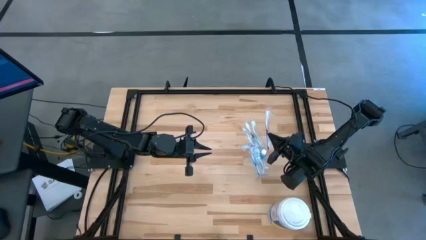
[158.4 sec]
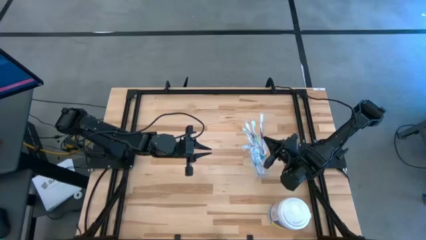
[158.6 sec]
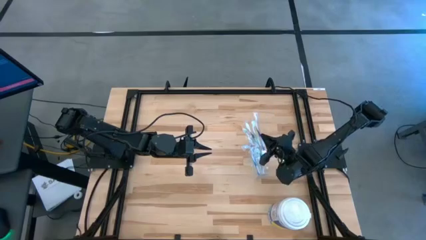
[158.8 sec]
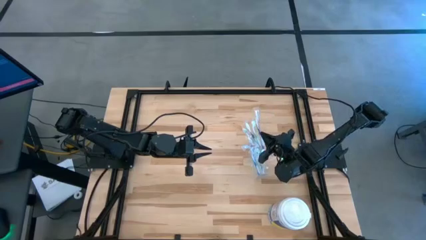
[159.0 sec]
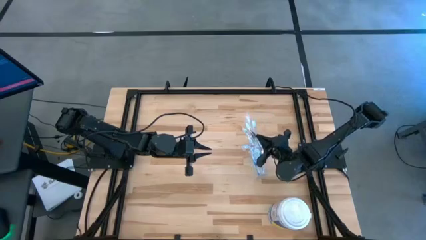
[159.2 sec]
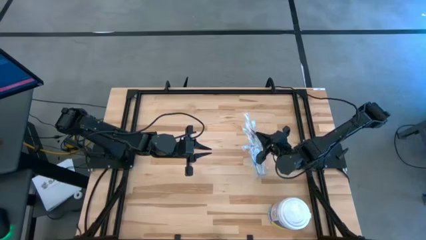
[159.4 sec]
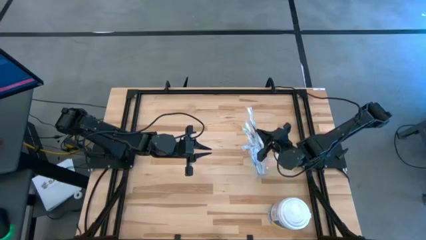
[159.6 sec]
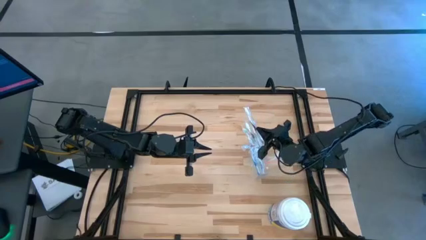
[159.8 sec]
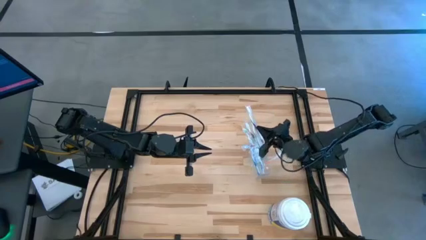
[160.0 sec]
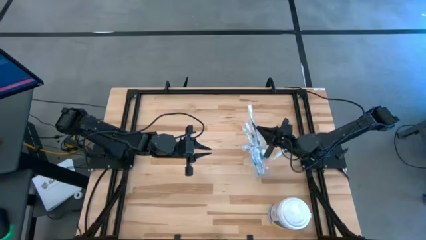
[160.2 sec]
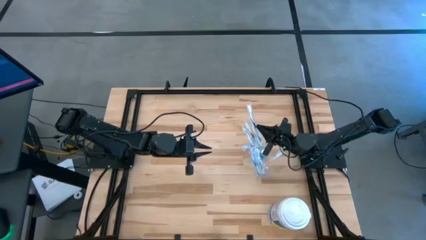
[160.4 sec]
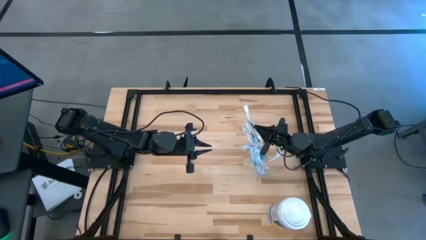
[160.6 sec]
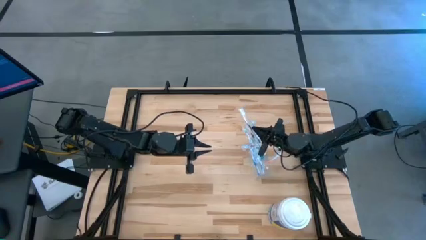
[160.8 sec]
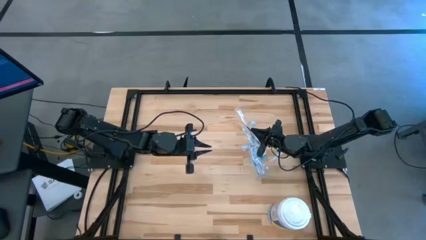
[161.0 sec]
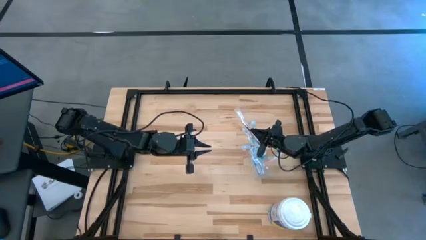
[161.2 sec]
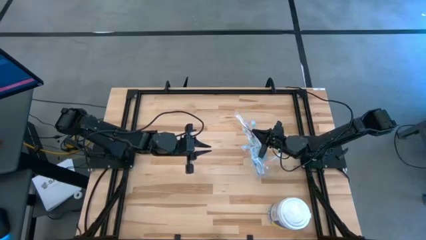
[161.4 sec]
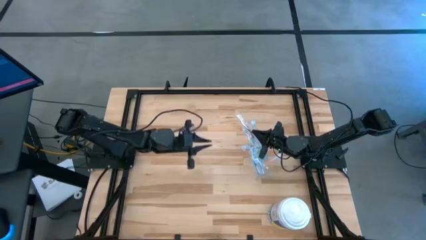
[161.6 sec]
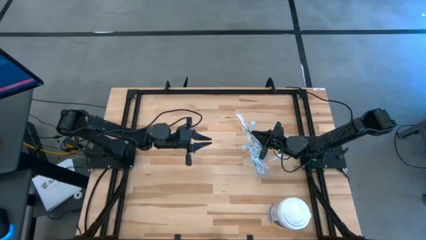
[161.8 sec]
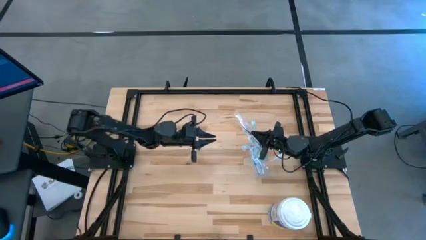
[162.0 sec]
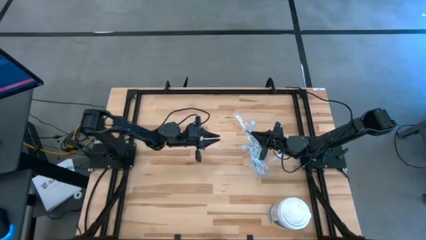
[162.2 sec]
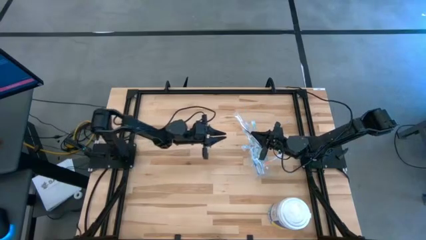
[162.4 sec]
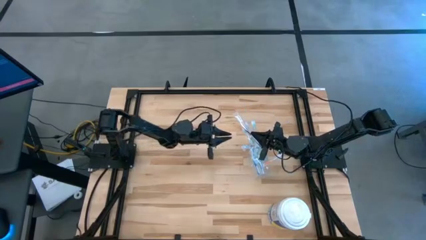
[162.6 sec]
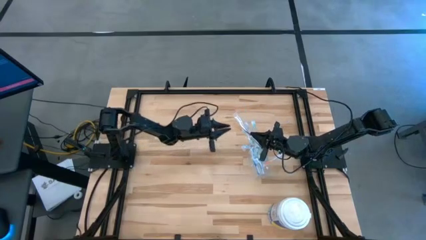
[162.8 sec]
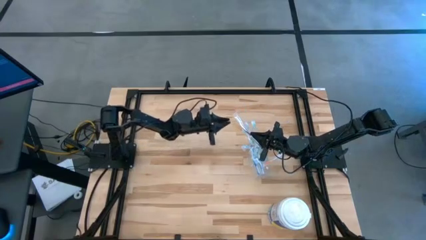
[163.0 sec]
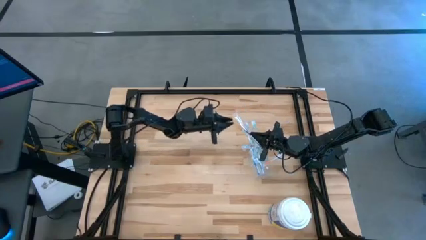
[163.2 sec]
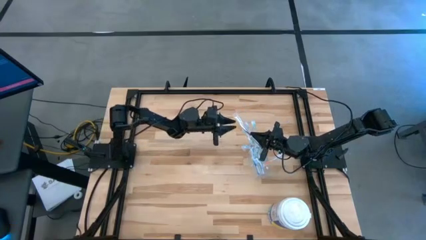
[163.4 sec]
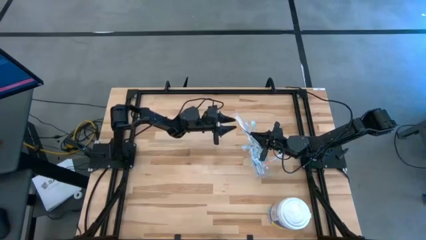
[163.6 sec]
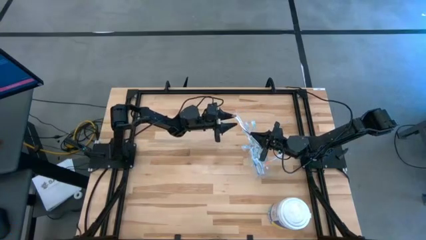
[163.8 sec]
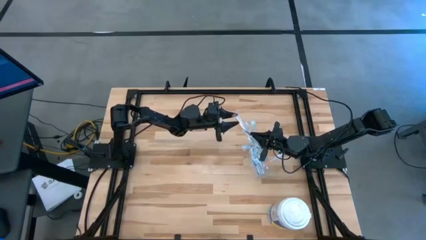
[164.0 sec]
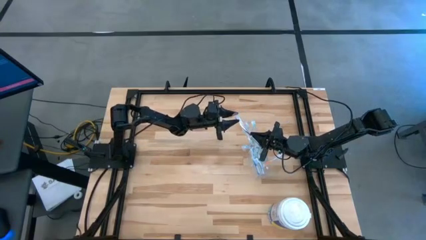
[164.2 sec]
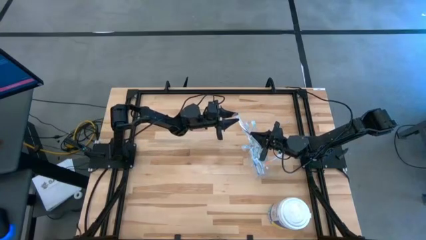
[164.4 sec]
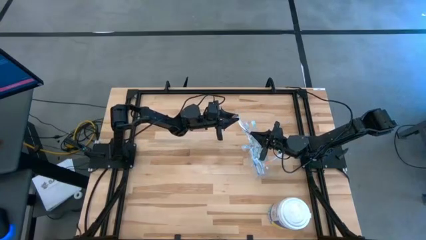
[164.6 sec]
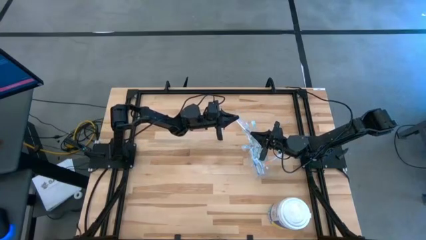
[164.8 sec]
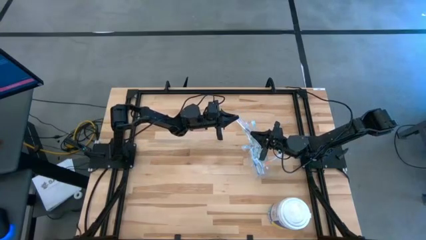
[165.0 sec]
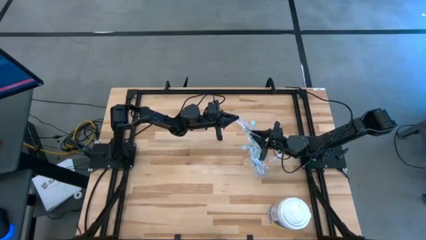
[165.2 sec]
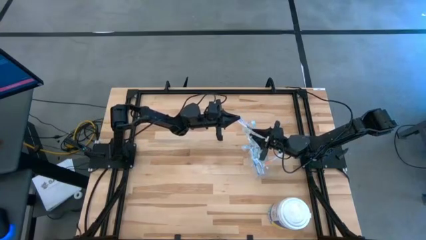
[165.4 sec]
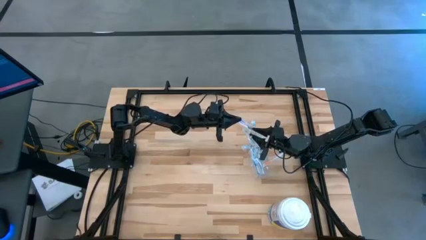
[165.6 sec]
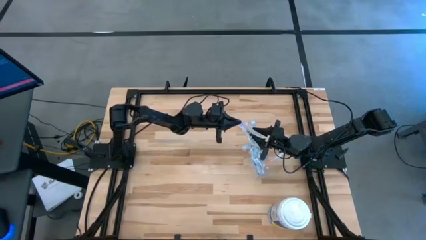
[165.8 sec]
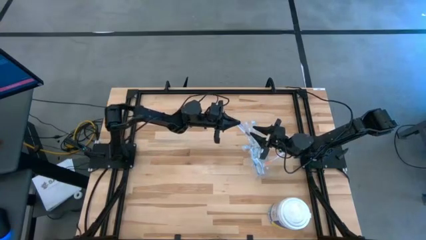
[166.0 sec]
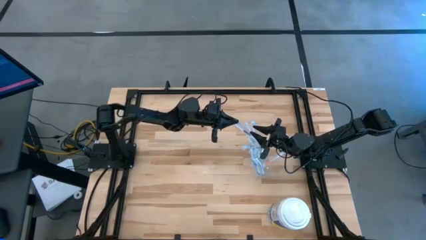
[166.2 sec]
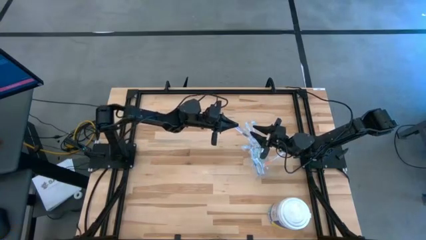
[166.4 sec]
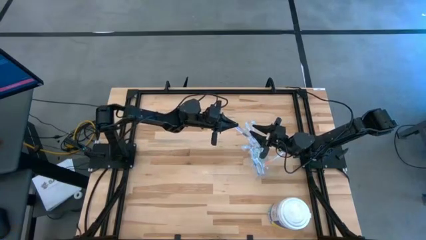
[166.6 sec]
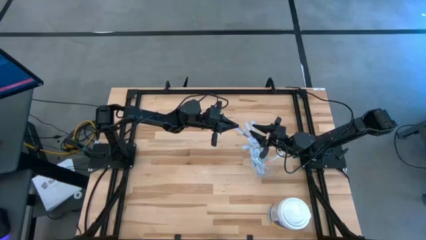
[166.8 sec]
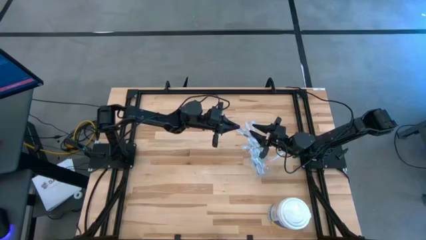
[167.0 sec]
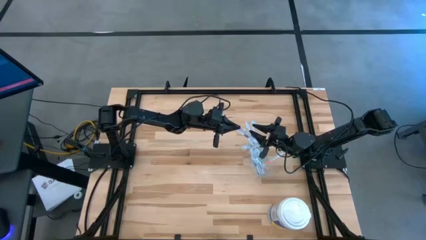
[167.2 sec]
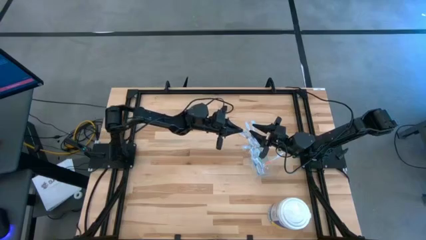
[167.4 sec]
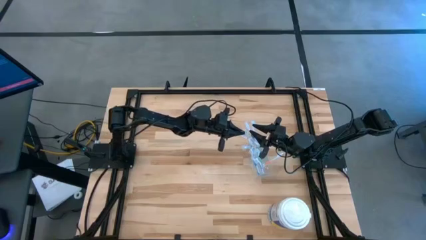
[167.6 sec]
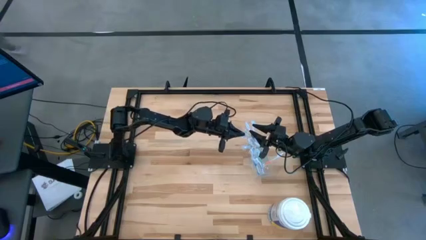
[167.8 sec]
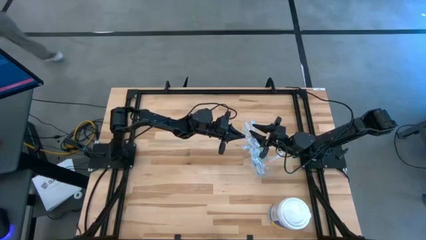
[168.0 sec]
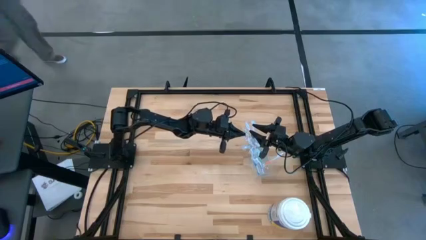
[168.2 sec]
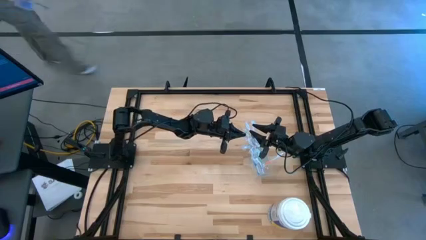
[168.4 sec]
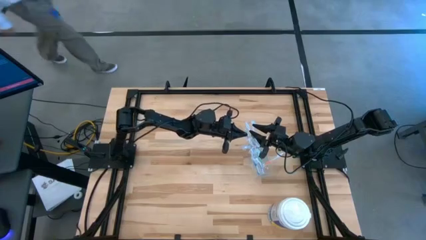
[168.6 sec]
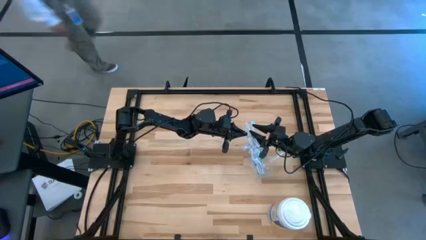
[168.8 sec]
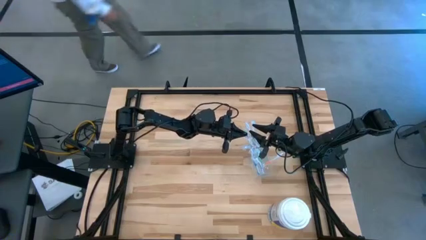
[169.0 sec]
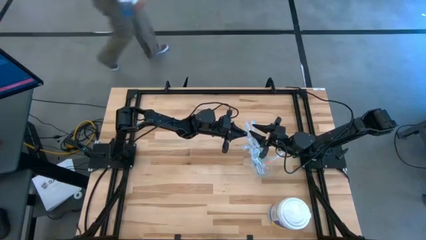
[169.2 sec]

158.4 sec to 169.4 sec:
Task: Pick & Place toothbrushing station
Put the purple toothbrush into the transparent organizer

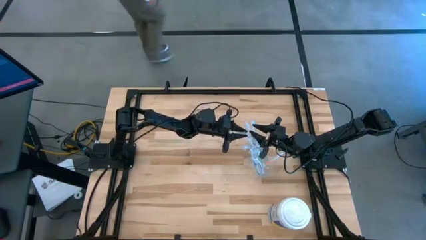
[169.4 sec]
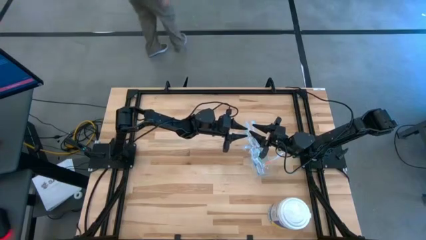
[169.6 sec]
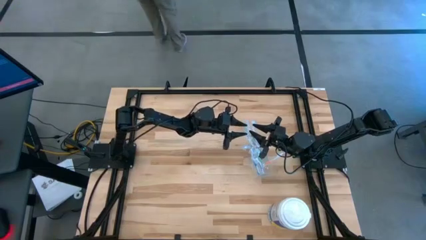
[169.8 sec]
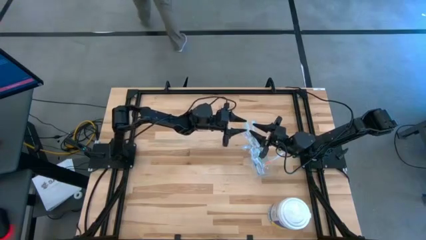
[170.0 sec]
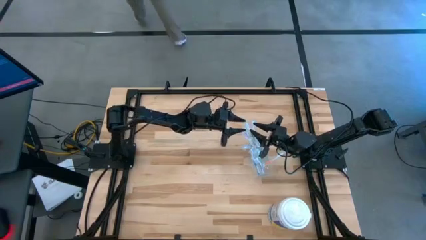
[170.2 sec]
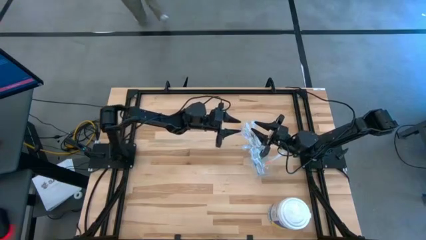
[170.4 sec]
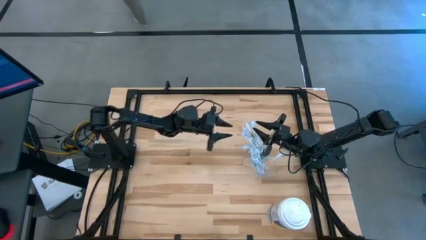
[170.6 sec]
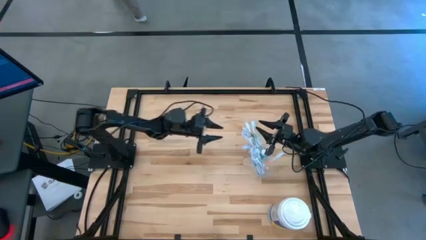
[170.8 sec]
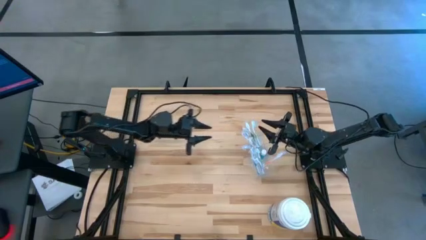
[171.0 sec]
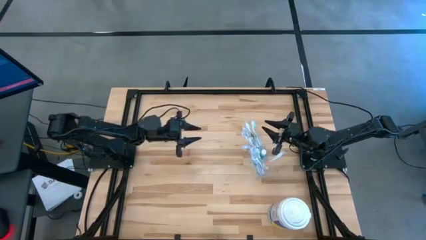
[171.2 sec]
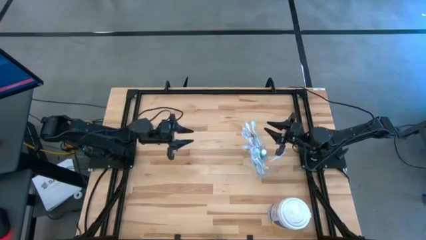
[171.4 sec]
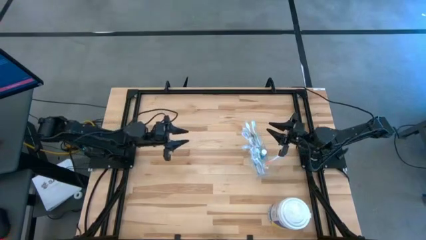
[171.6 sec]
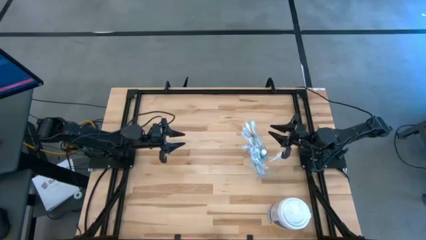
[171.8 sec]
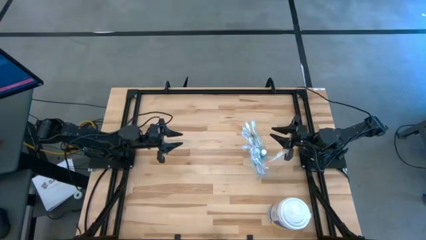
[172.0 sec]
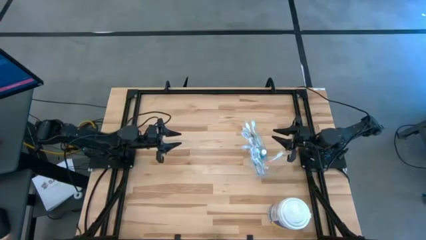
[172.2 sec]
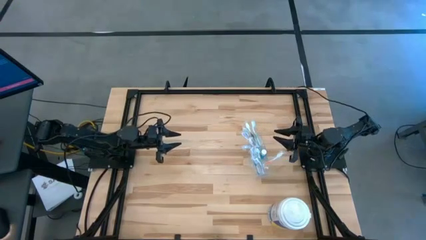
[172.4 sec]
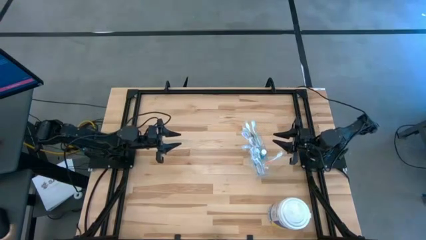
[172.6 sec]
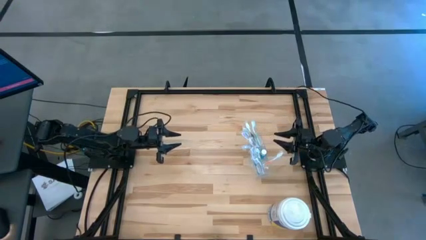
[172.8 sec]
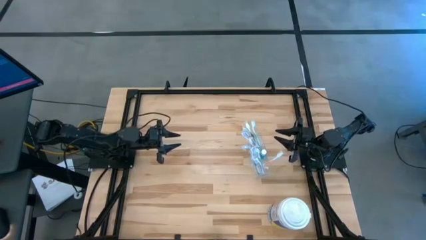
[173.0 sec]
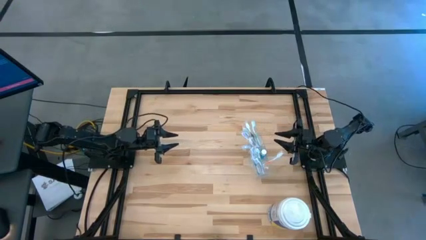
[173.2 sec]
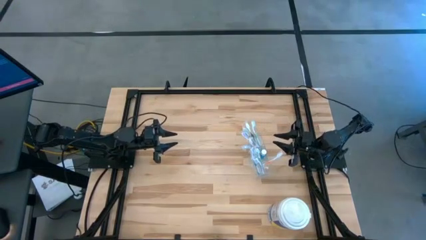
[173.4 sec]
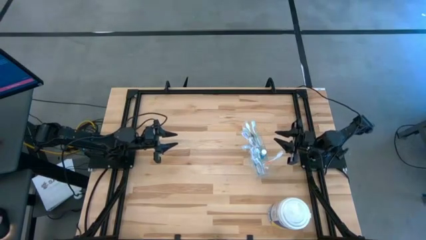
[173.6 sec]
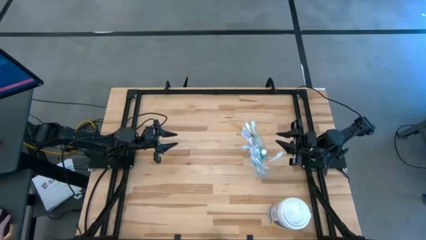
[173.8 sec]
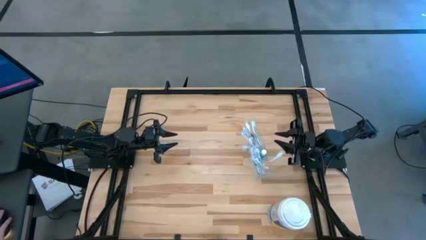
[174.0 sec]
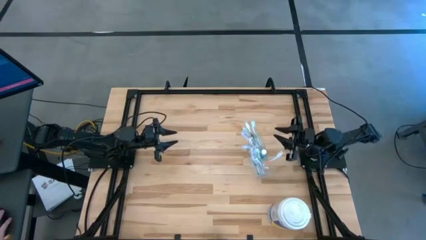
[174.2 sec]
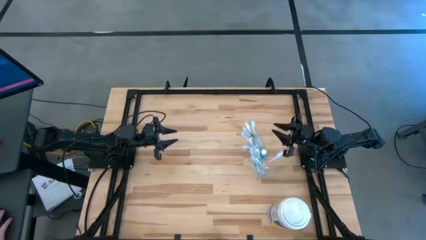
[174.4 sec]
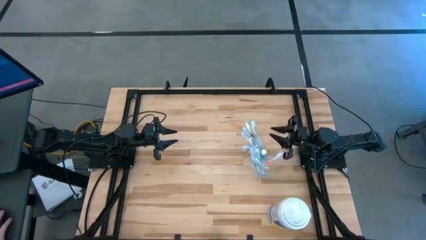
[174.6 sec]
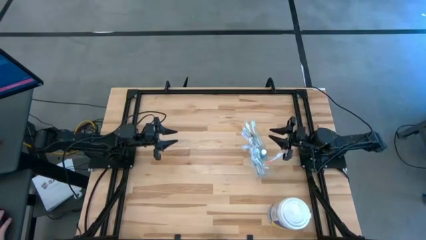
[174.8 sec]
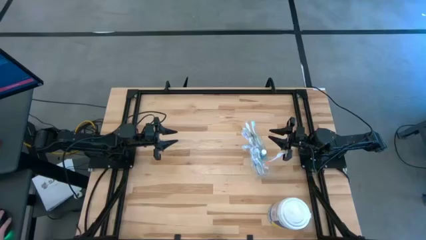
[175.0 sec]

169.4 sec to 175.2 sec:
Return to Home Position
